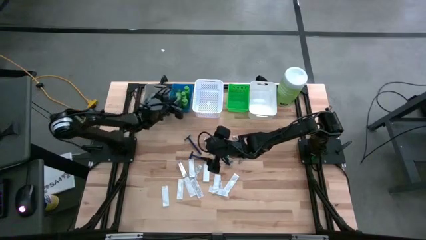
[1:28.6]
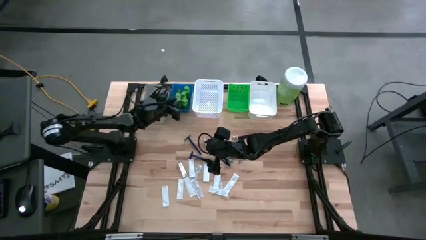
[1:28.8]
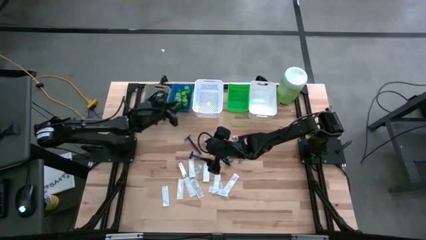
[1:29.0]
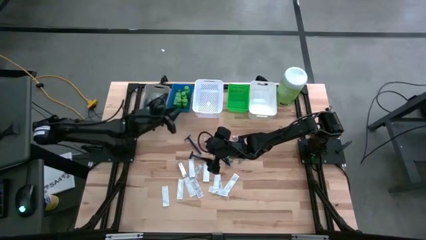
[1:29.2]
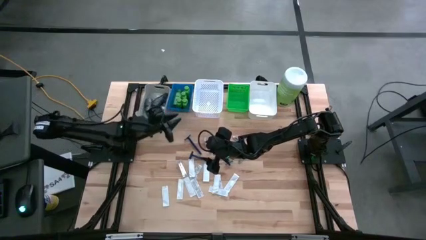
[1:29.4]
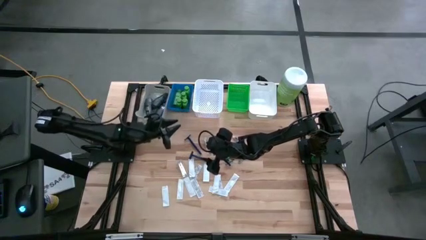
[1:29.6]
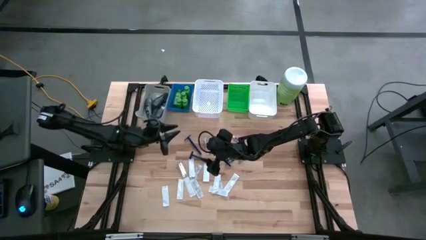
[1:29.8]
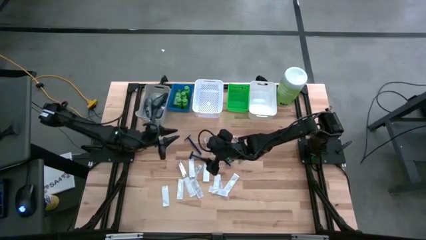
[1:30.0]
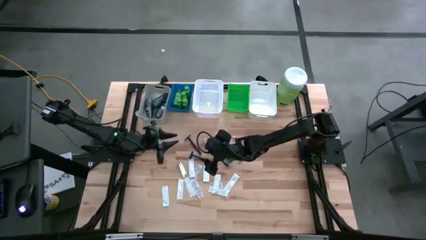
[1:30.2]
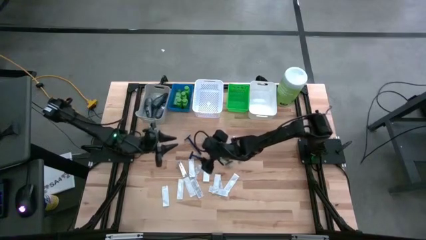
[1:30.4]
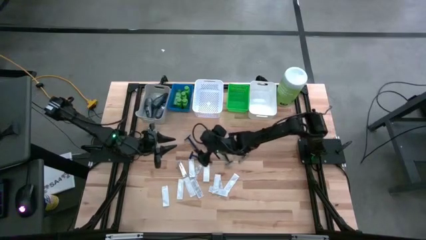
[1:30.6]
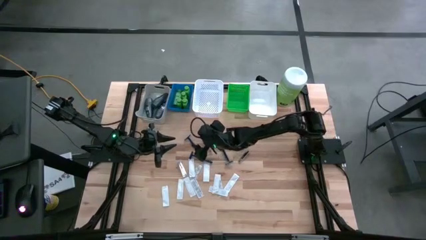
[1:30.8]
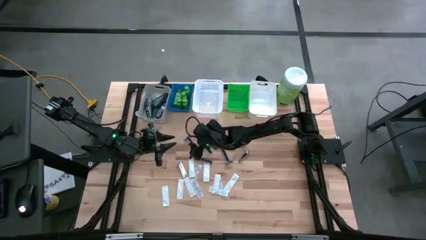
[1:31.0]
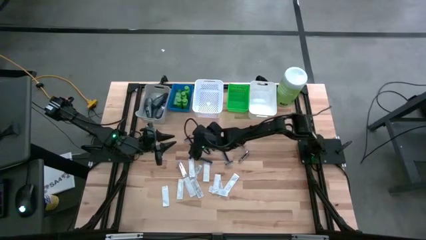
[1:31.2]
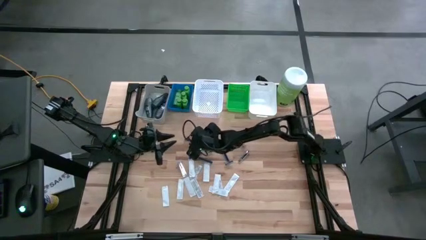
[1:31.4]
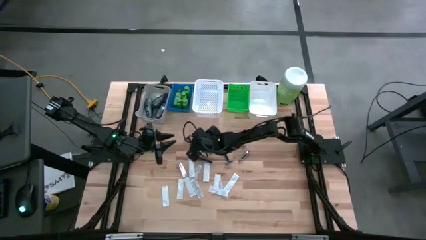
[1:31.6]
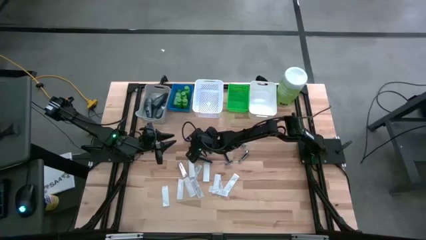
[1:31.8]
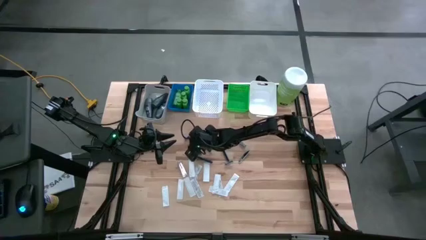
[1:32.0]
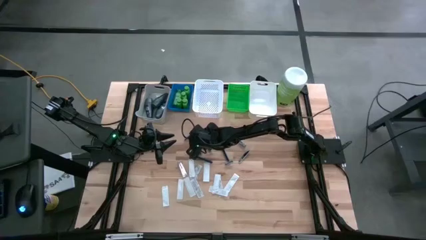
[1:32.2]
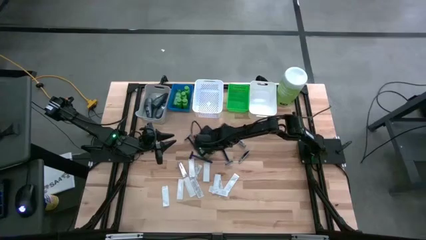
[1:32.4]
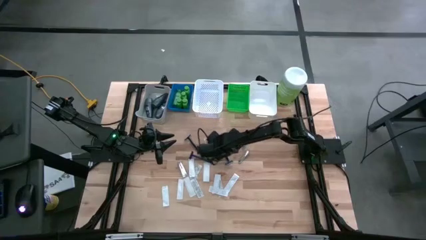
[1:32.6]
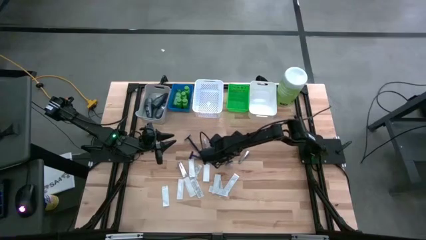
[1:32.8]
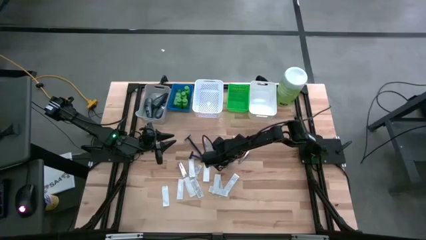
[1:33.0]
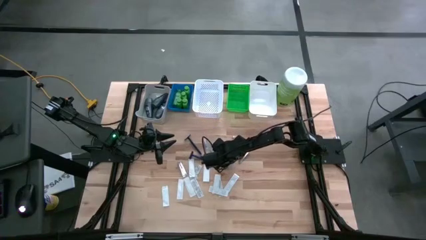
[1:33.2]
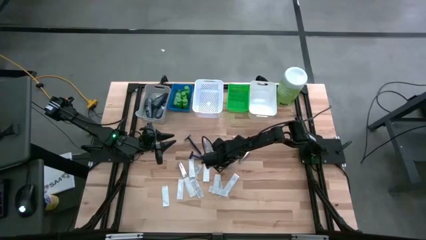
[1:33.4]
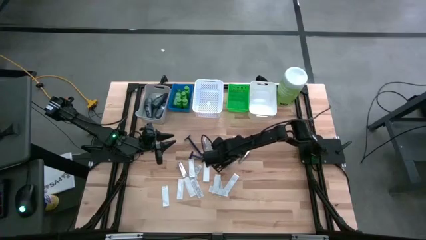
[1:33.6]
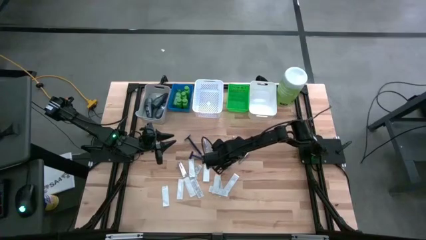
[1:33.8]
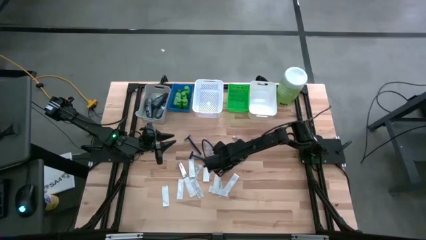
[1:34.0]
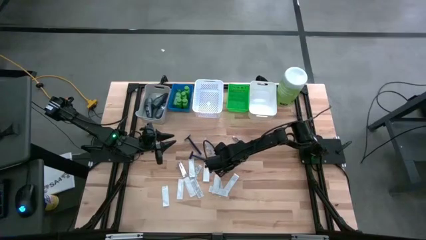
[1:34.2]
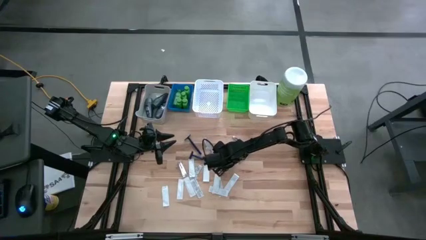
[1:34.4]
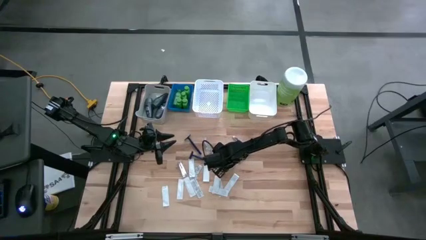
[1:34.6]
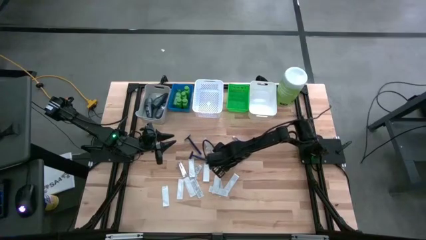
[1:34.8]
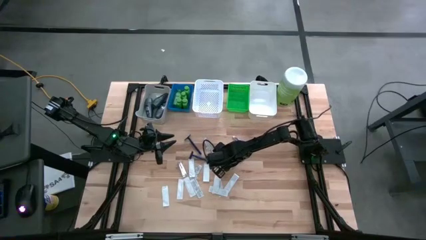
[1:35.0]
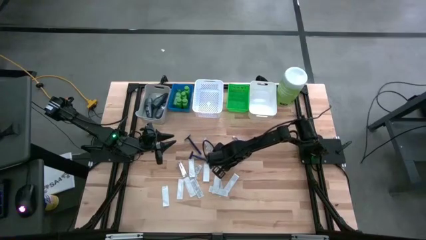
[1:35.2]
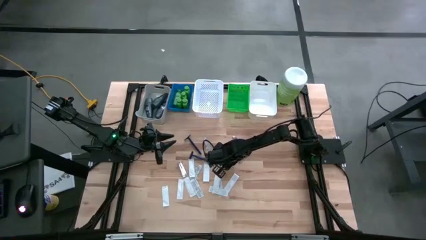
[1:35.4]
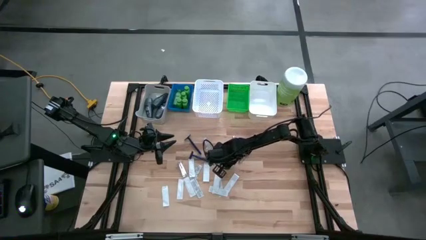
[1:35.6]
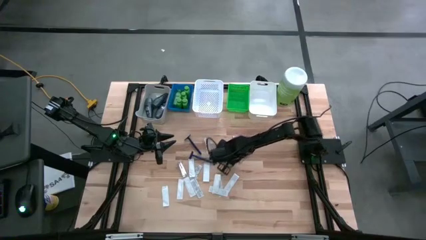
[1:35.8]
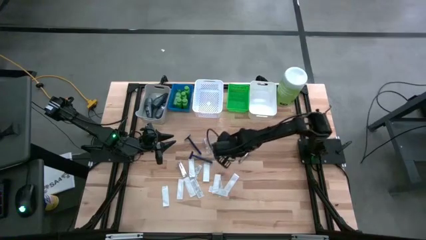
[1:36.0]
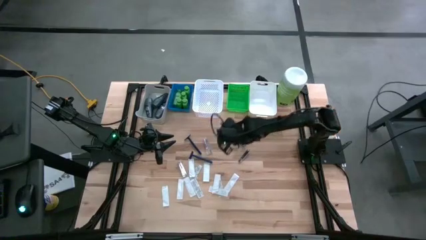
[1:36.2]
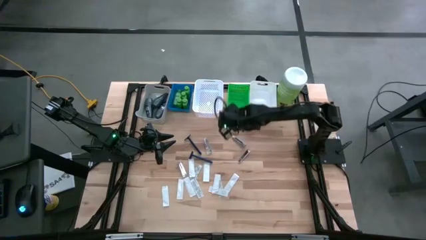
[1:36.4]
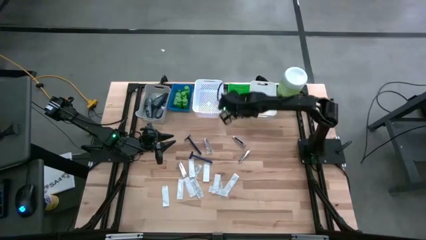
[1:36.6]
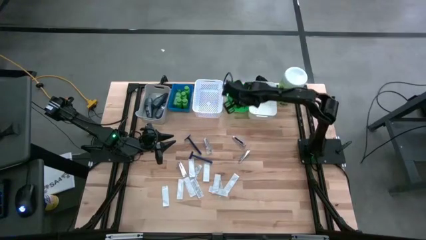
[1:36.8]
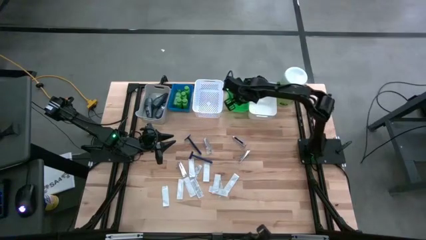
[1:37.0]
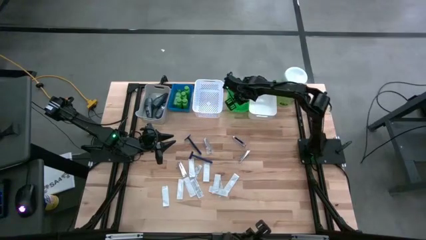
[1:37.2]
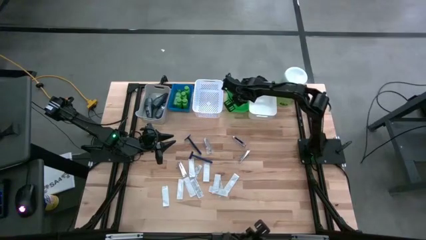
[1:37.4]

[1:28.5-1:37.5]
Task: Pick & Place Travel size toiletries
Put the right razor into the green bin

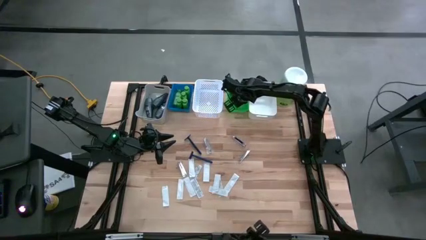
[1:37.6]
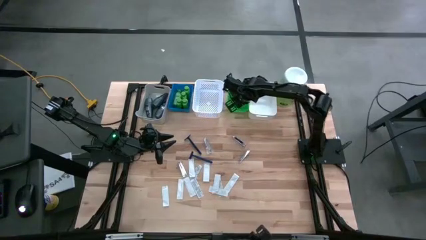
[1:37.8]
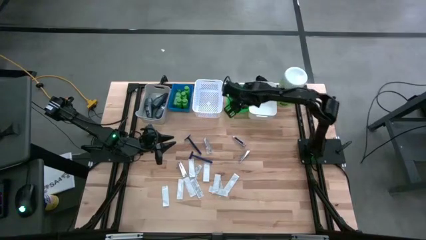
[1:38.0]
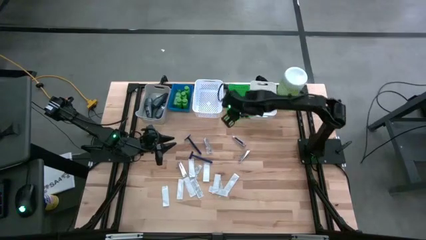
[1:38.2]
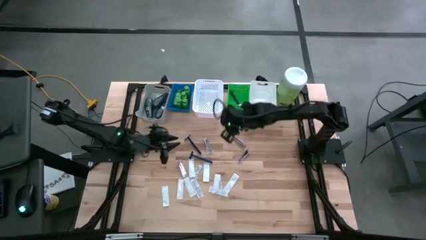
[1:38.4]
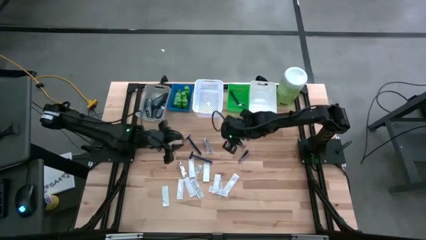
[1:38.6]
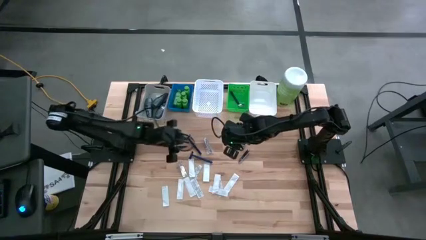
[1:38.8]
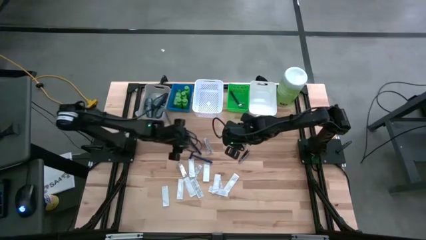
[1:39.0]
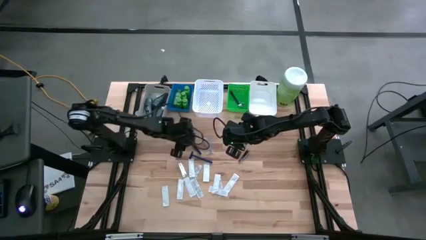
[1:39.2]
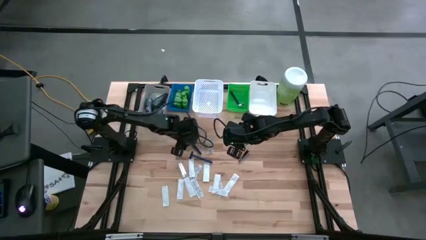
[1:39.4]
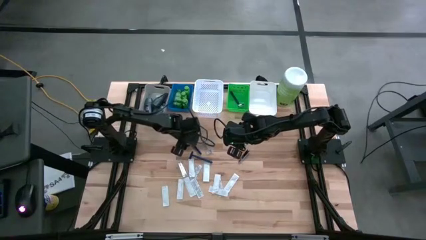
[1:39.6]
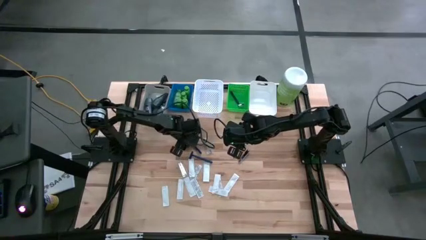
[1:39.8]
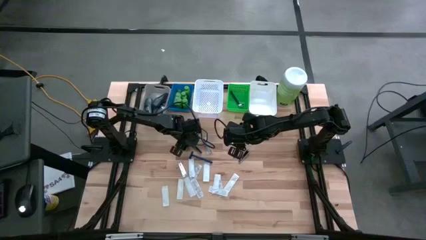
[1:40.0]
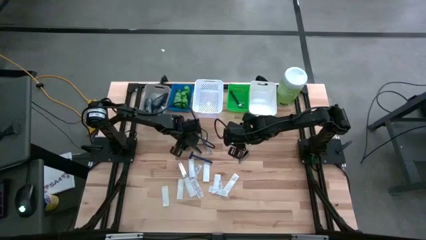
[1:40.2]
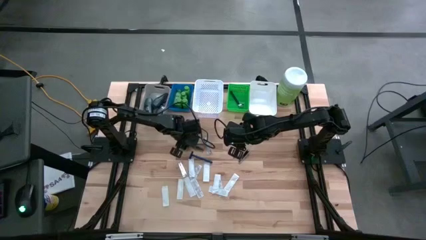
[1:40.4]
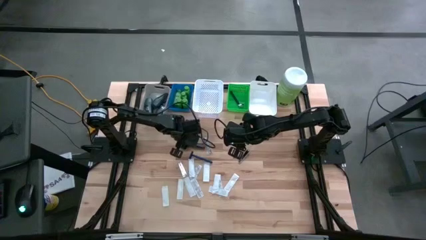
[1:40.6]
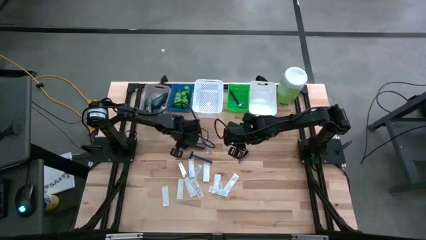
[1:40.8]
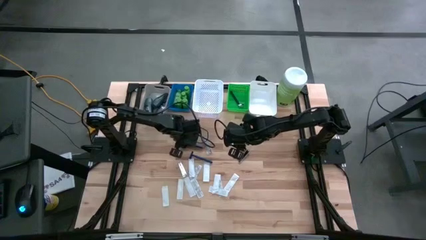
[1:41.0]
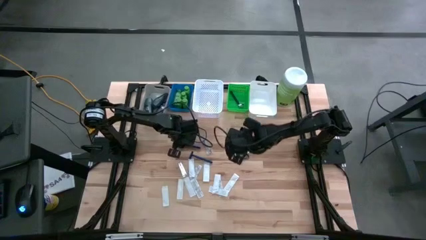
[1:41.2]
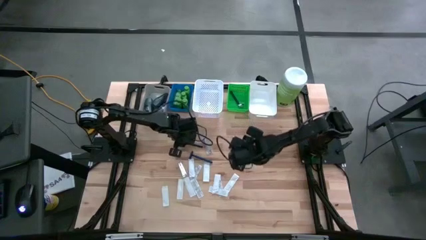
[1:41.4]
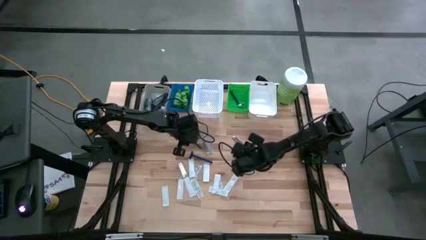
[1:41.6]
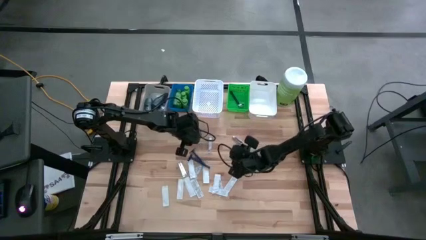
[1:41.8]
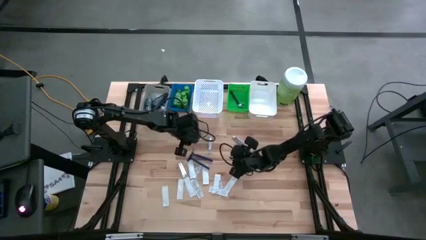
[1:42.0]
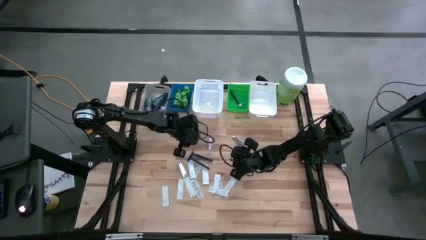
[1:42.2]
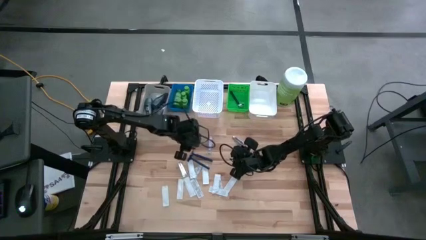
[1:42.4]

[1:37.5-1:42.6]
Put the top razor into the green bin
